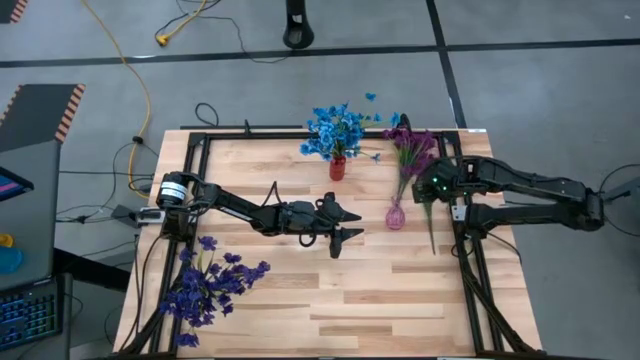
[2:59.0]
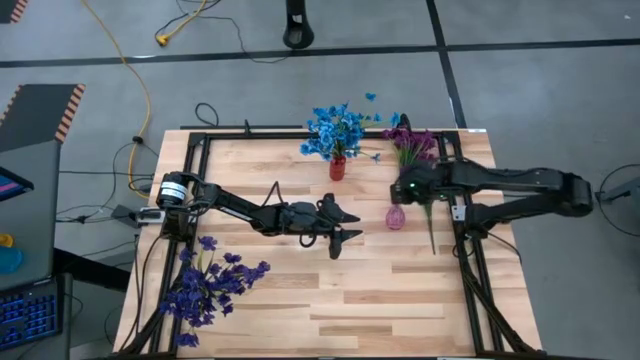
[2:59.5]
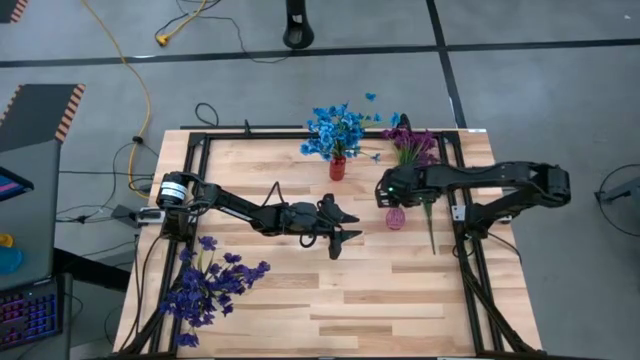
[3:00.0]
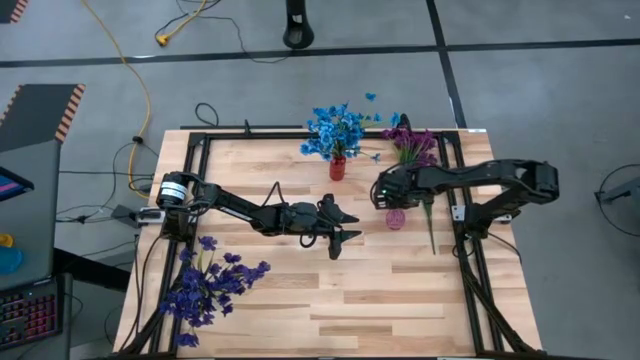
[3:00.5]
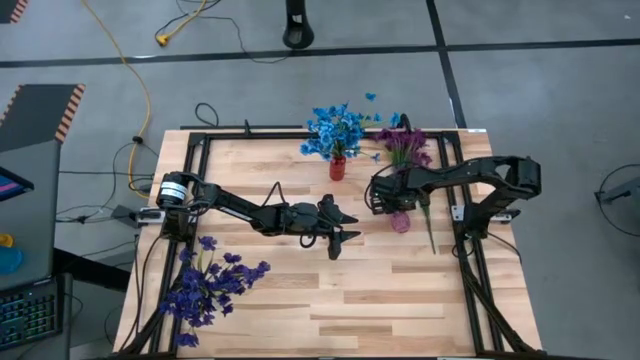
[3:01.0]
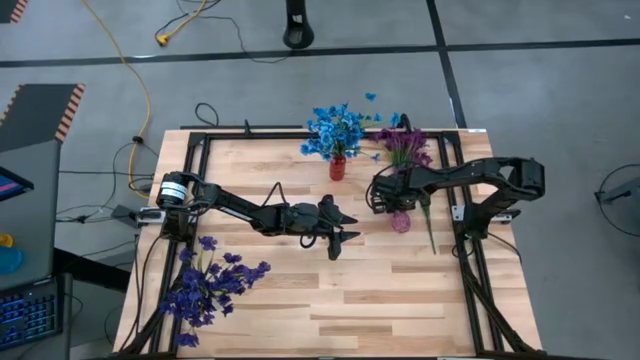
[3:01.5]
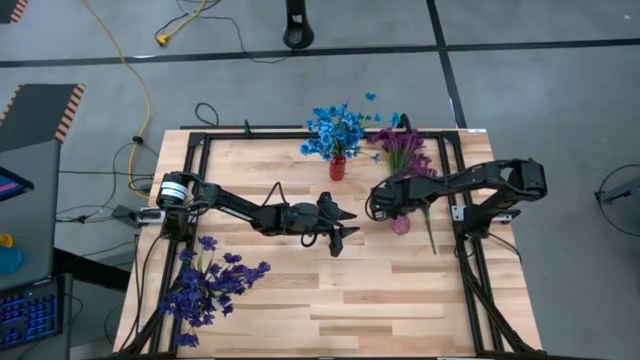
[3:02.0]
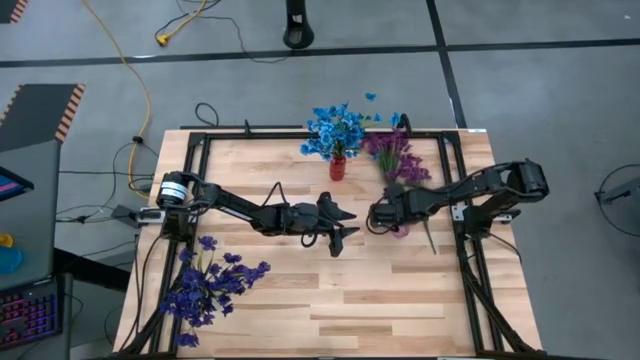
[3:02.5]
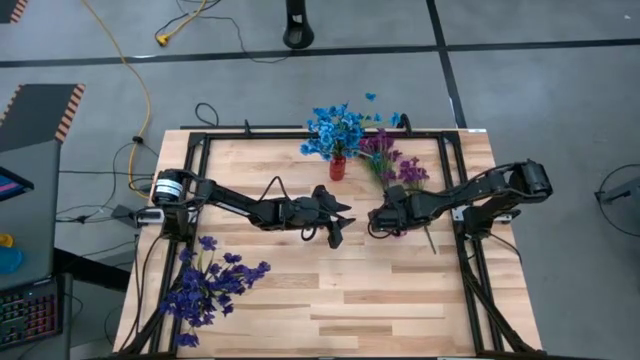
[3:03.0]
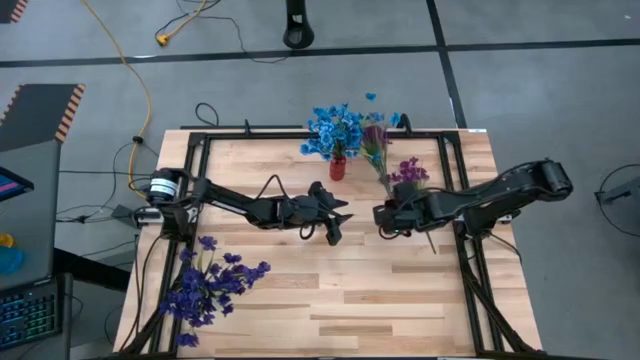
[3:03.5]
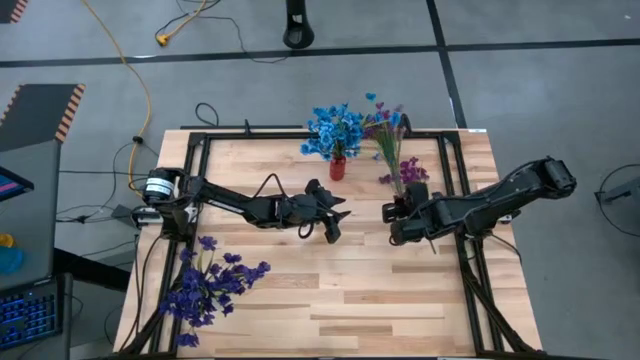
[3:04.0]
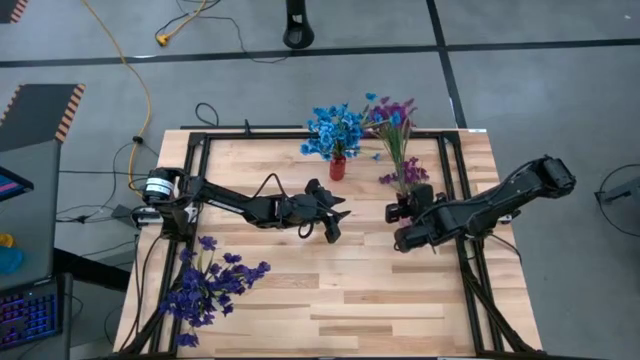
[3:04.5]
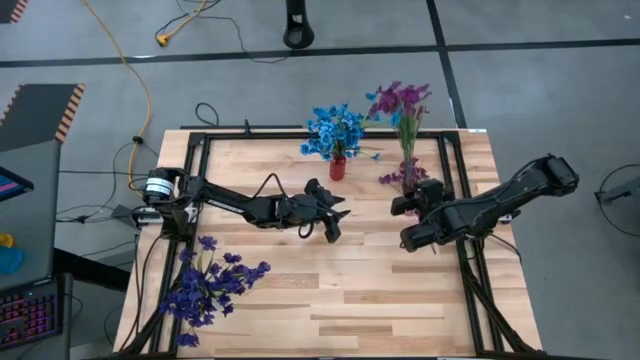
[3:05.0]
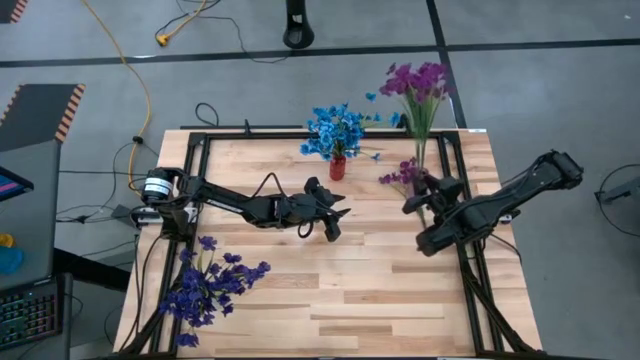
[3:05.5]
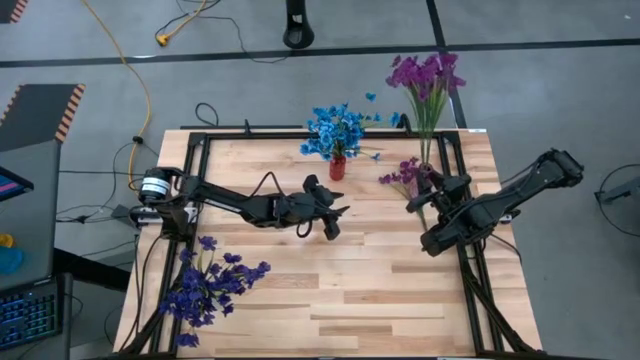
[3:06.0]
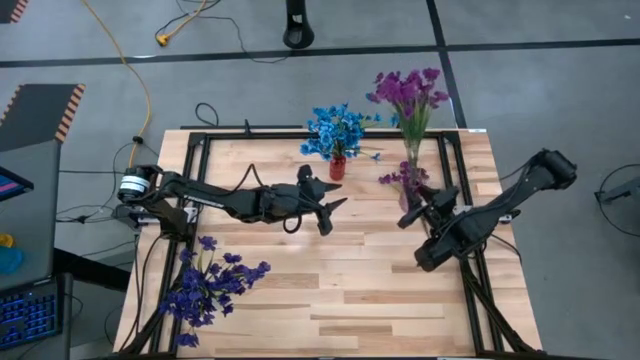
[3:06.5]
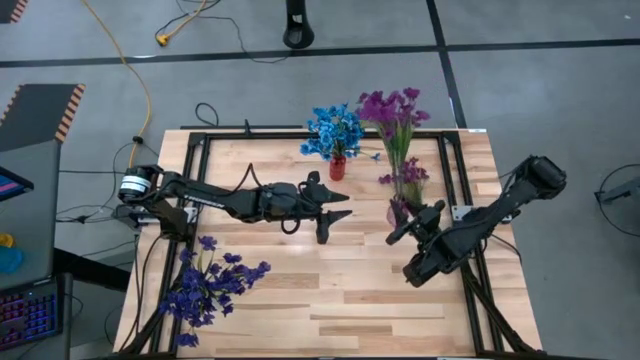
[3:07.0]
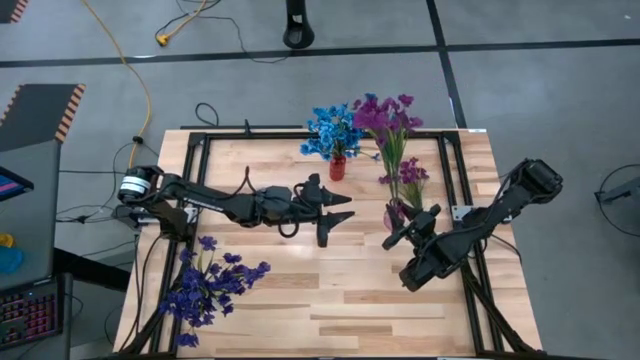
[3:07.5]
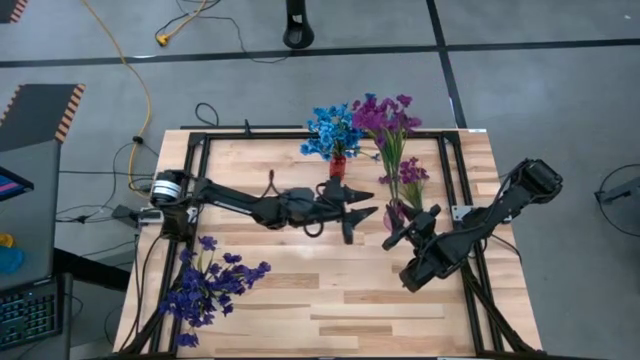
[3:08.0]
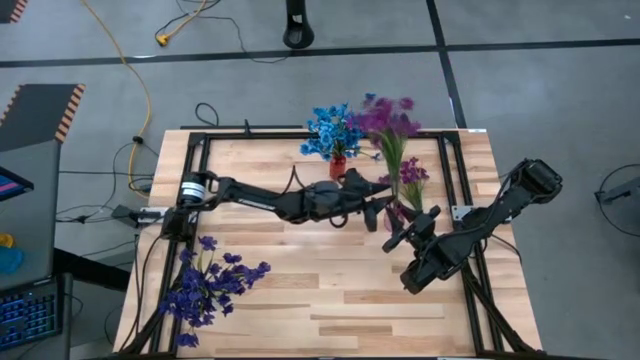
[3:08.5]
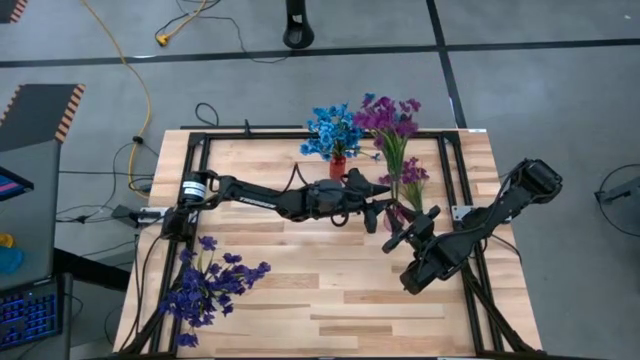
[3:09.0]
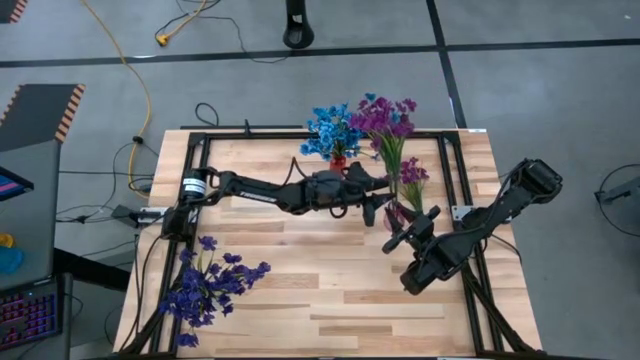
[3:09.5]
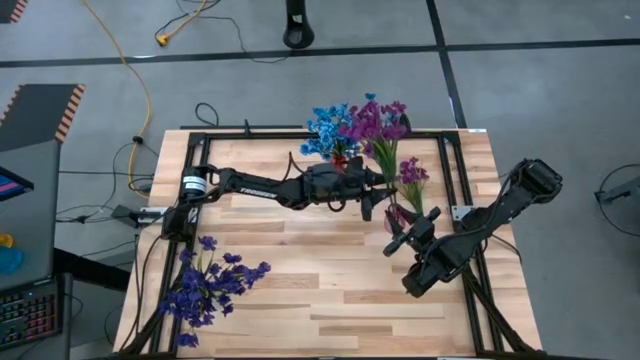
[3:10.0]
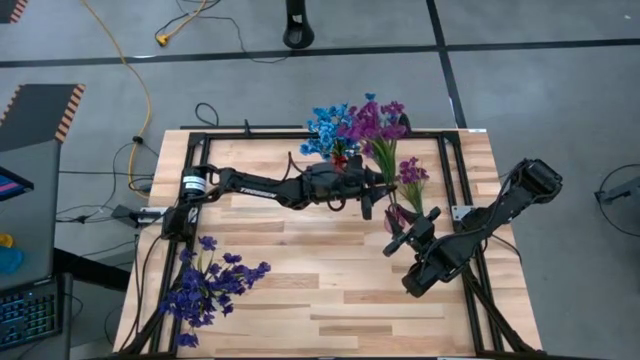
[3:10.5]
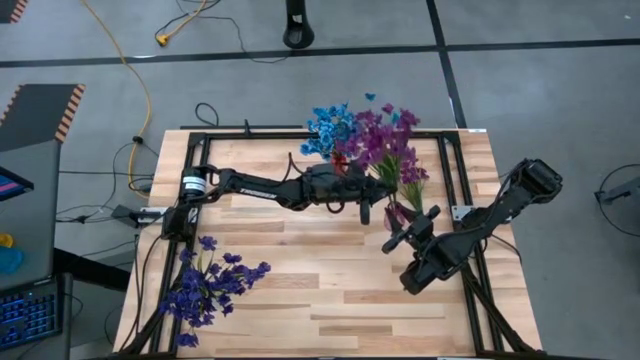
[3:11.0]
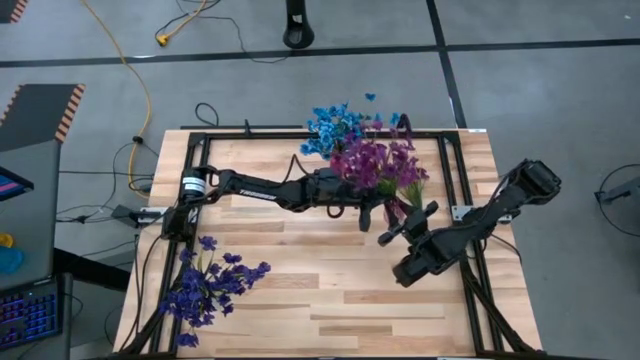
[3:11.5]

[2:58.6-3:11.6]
Task: Sort flowers into vase by color
Adjust the violet vase and the violet flowers inside it

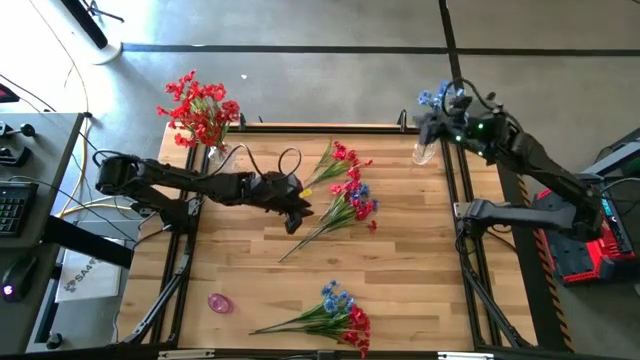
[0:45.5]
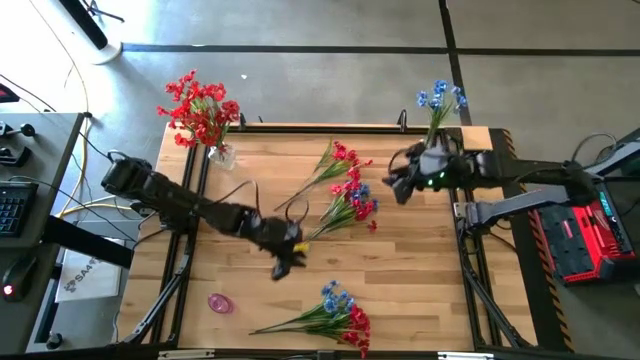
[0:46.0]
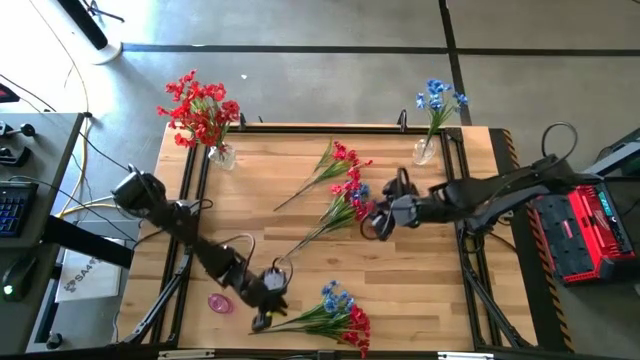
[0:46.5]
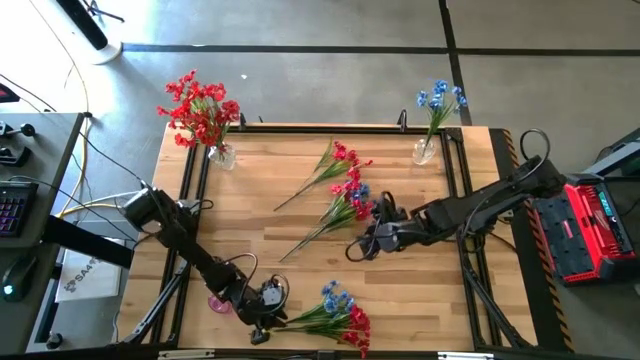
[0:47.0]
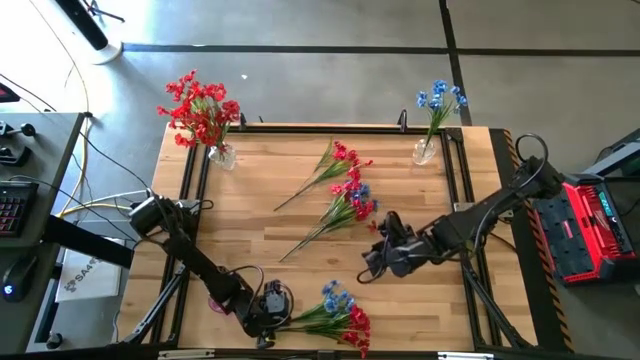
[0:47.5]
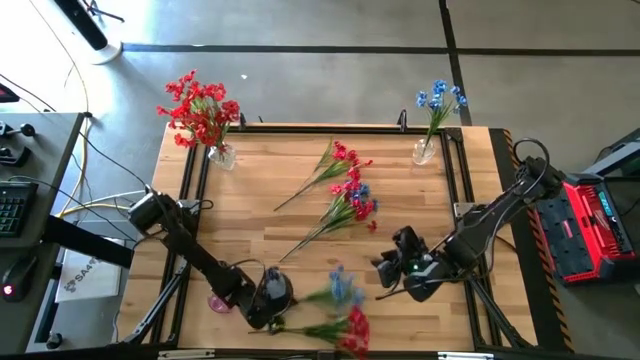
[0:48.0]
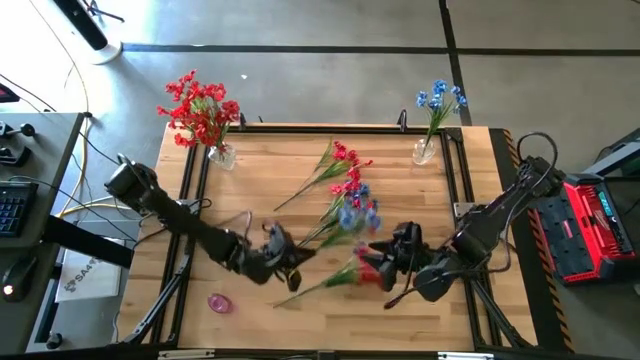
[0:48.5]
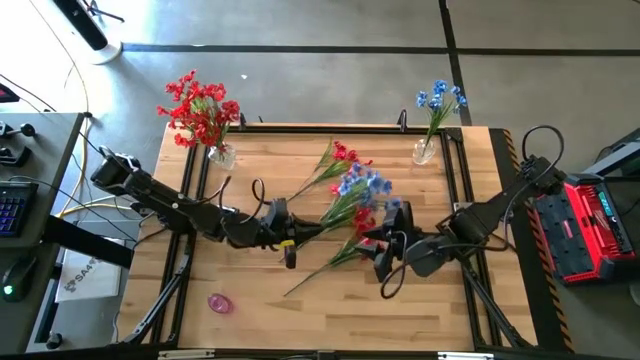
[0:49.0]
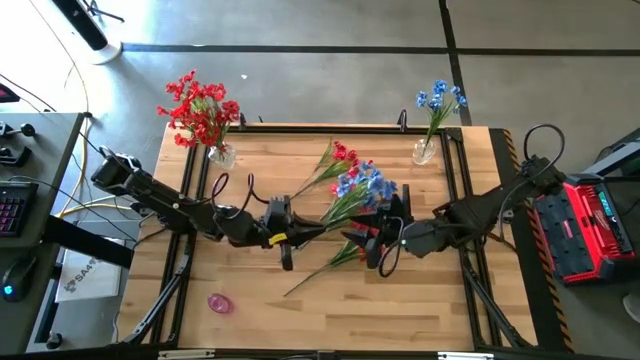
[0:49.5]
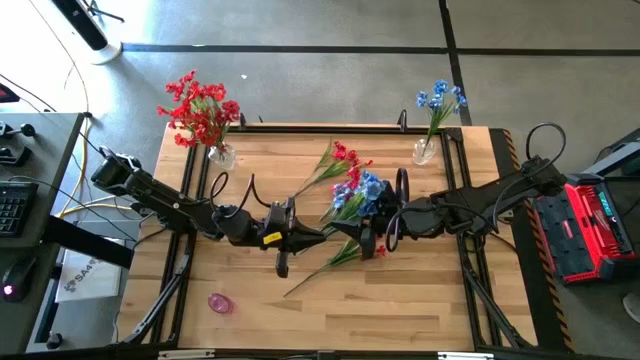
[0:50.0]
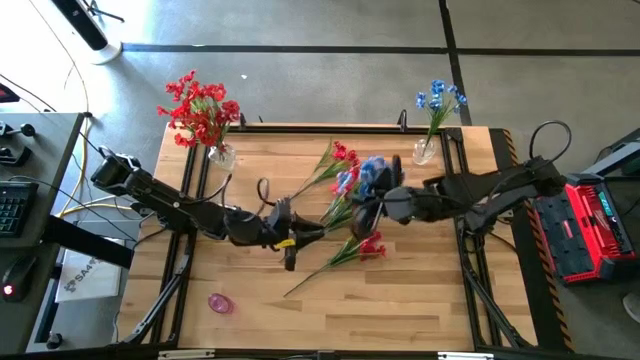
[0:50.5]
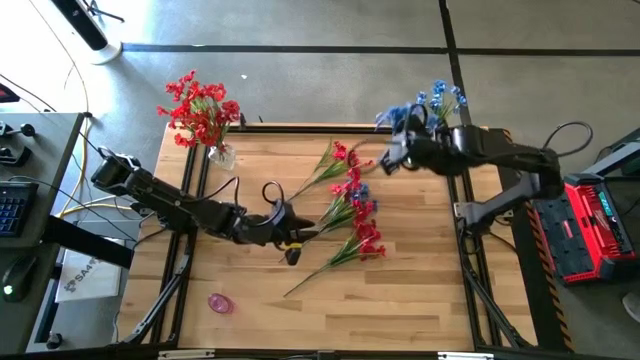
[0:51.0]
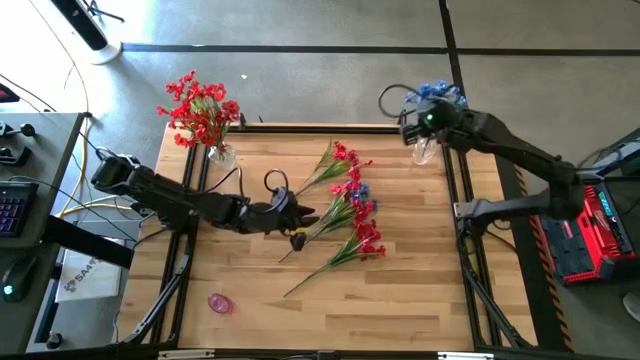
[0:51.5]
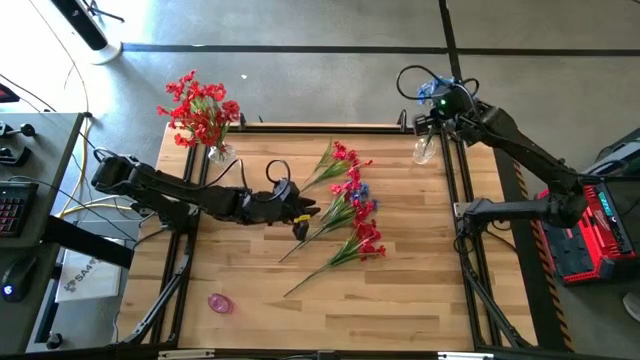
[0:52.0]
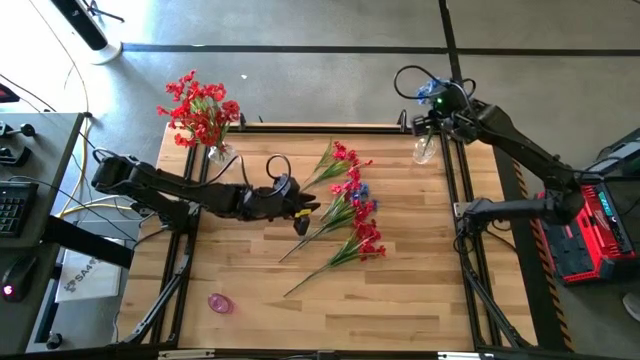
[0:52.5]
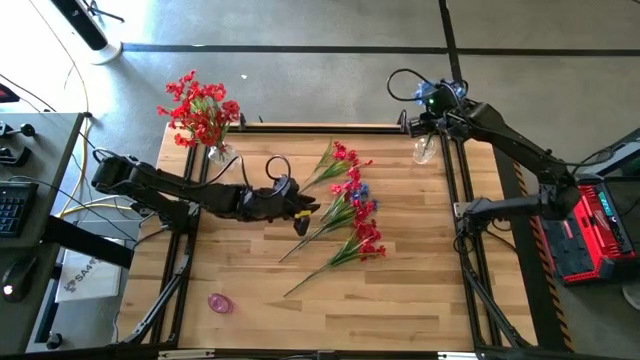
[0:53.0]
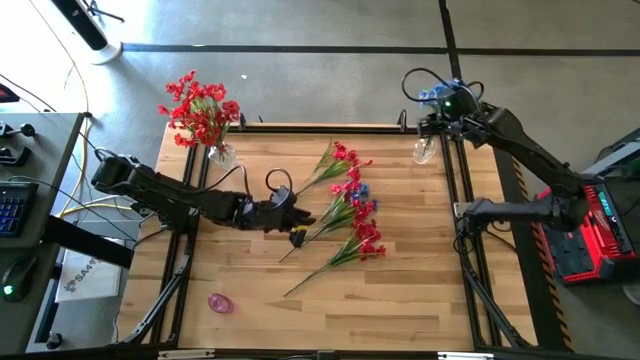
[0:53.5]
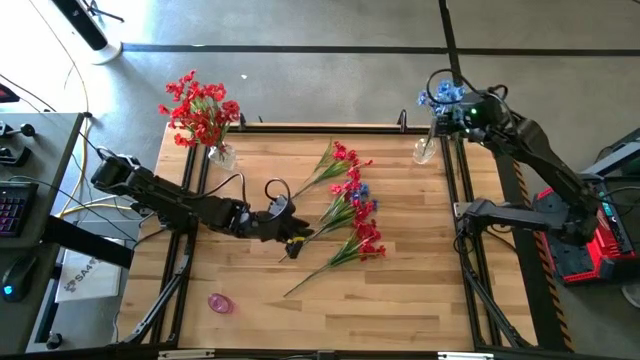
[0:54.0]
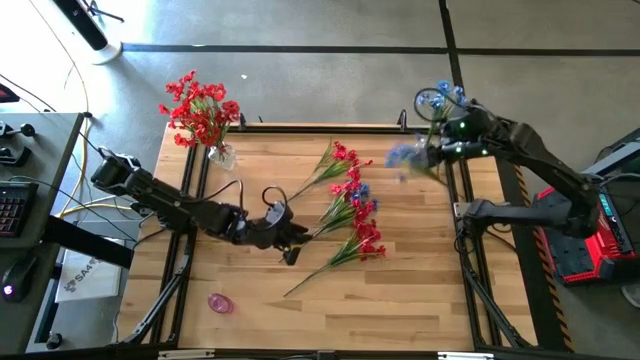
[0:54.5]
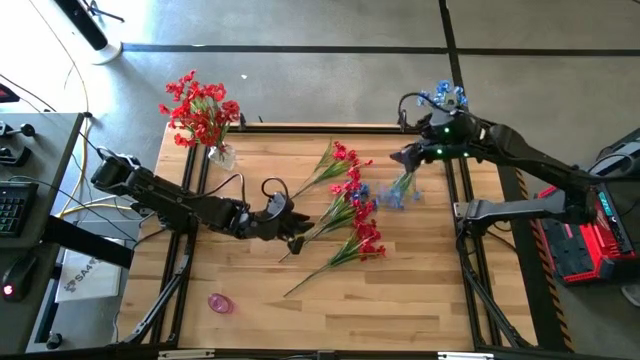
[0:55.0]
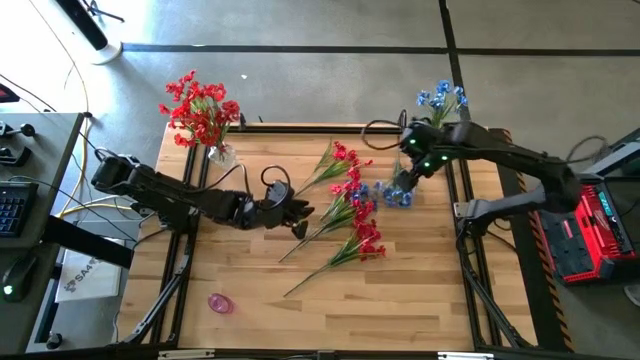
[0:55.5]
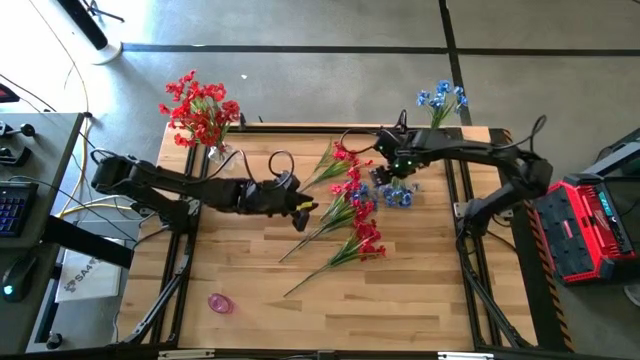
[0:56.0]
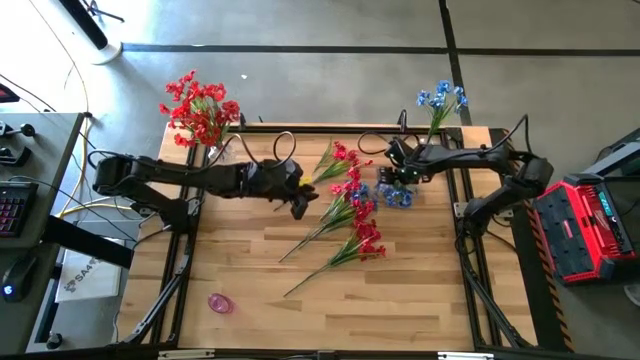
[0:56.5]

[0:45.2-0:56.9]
Task: Sort flowers into vase by color
Put the bottom blue flower into the right transparent vase
